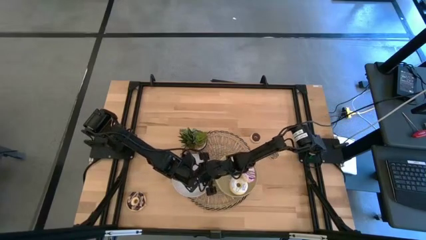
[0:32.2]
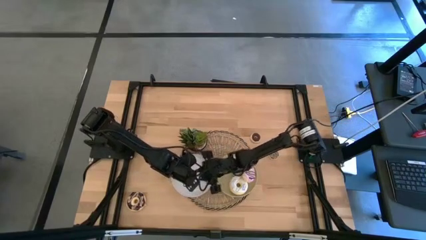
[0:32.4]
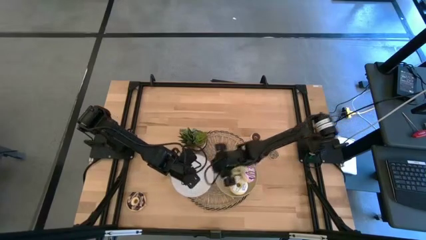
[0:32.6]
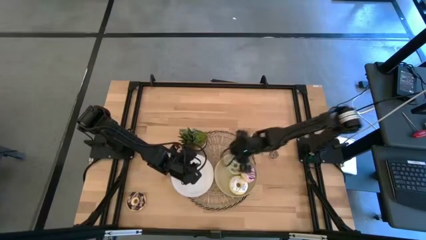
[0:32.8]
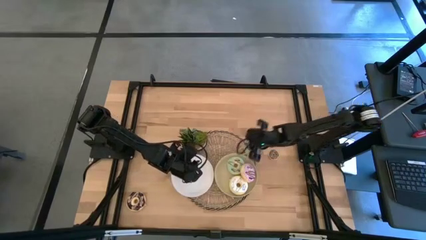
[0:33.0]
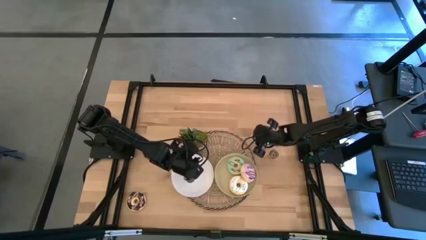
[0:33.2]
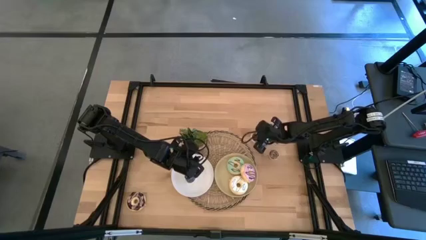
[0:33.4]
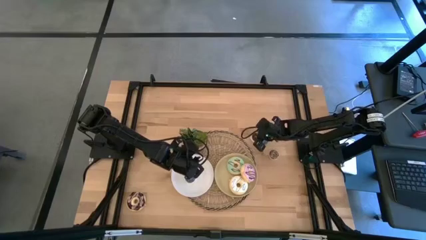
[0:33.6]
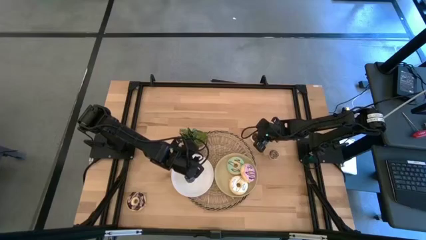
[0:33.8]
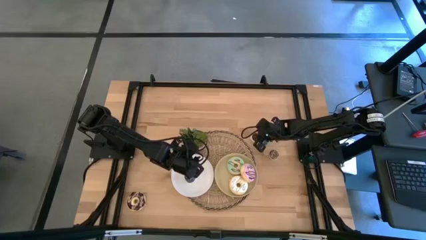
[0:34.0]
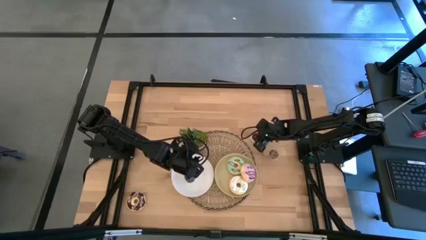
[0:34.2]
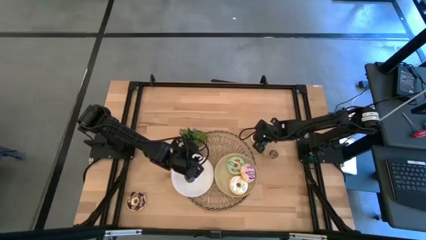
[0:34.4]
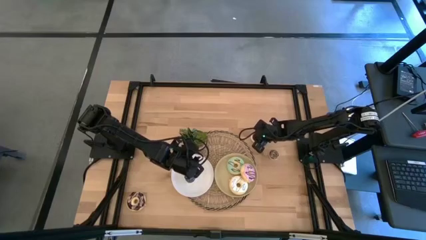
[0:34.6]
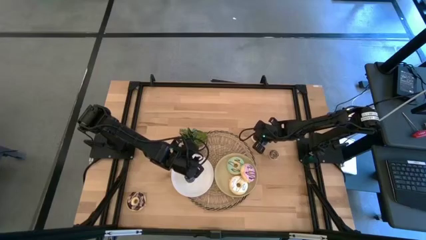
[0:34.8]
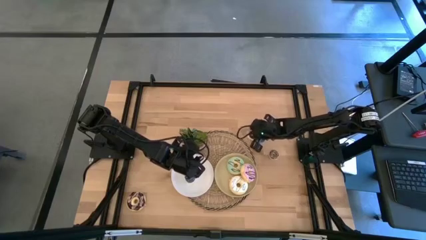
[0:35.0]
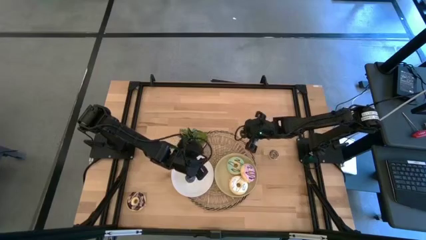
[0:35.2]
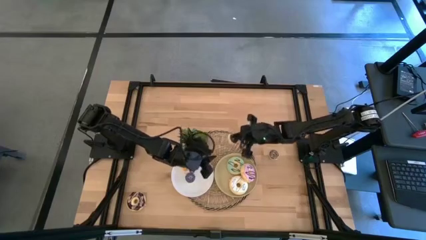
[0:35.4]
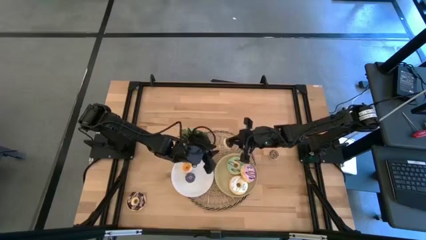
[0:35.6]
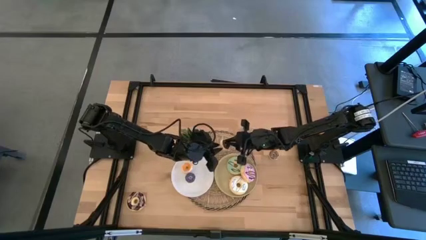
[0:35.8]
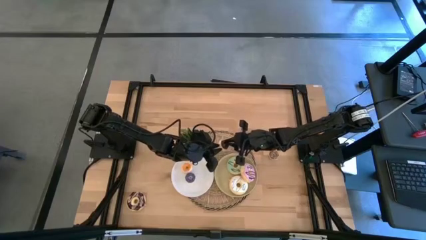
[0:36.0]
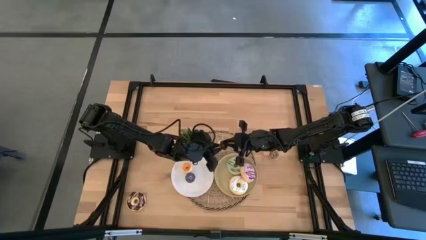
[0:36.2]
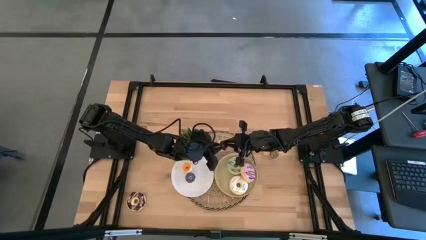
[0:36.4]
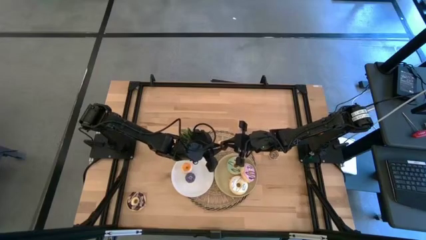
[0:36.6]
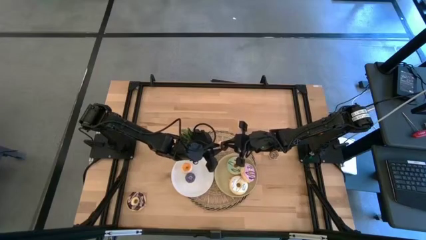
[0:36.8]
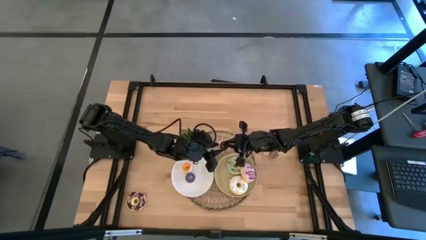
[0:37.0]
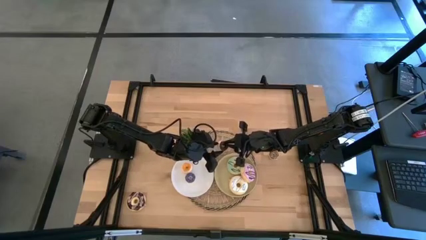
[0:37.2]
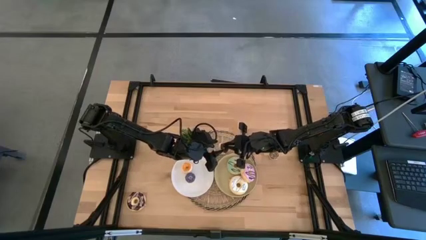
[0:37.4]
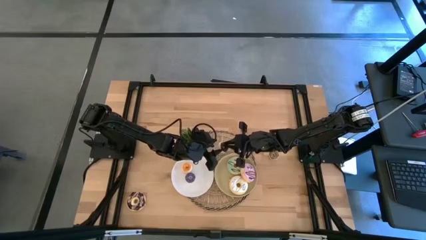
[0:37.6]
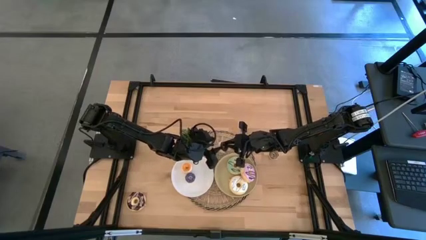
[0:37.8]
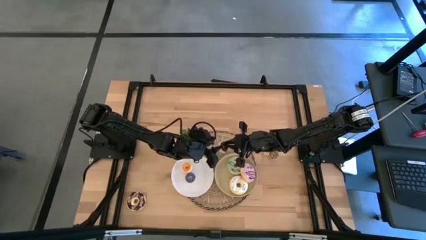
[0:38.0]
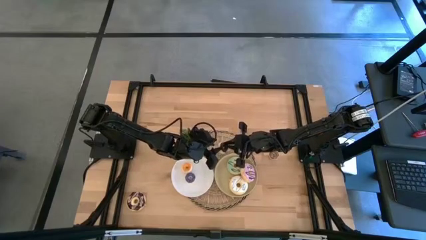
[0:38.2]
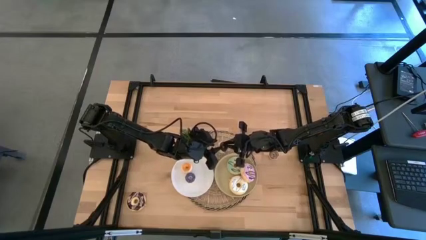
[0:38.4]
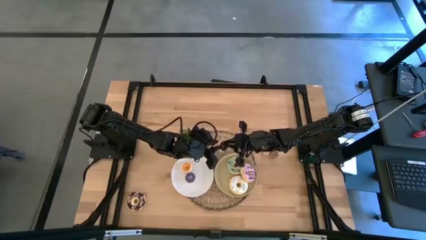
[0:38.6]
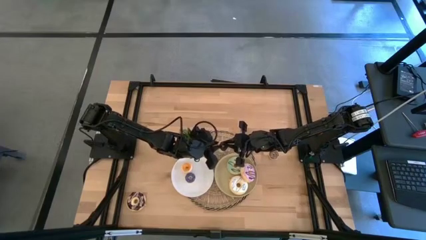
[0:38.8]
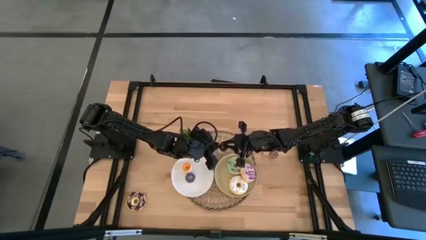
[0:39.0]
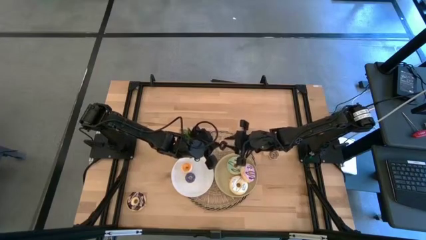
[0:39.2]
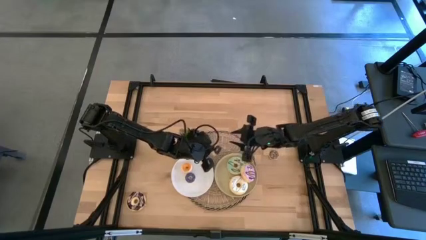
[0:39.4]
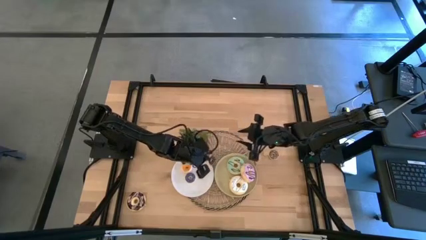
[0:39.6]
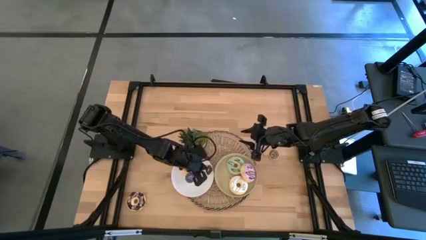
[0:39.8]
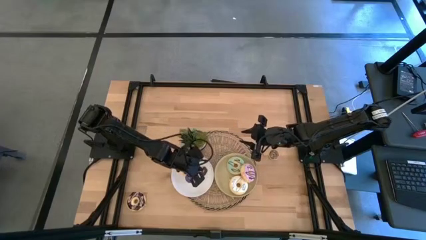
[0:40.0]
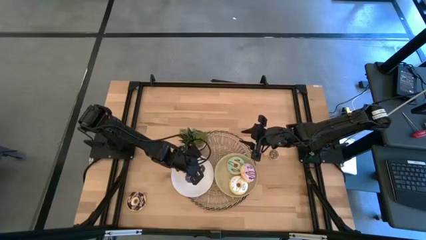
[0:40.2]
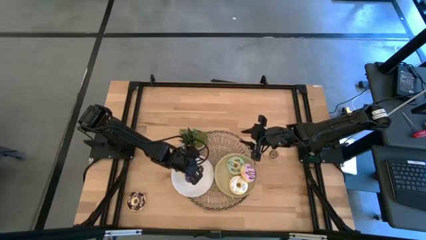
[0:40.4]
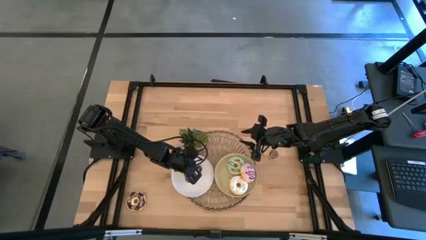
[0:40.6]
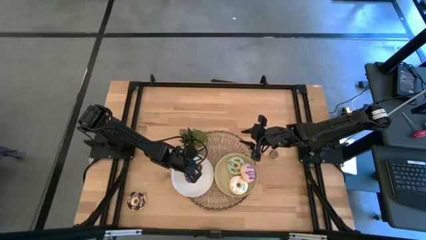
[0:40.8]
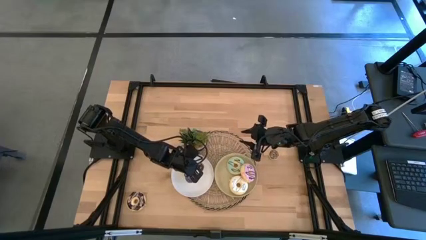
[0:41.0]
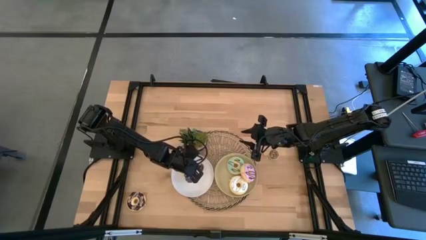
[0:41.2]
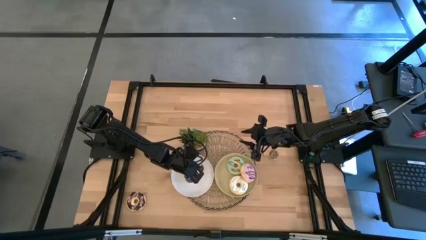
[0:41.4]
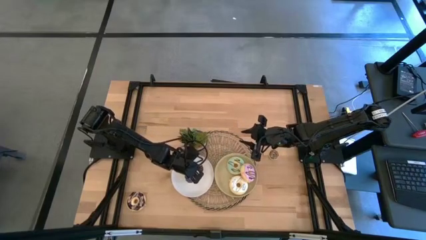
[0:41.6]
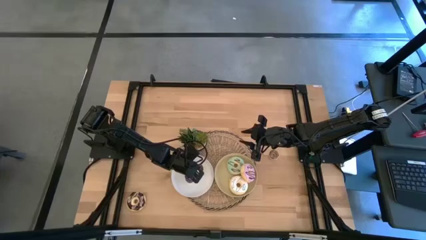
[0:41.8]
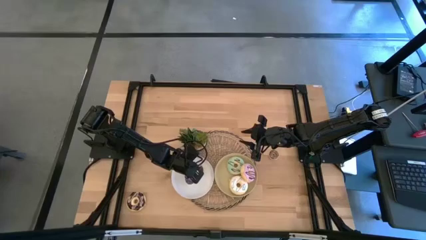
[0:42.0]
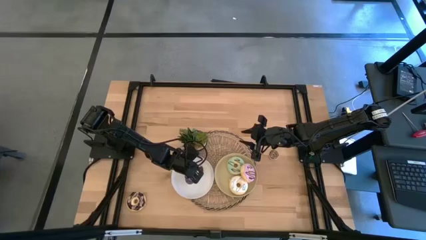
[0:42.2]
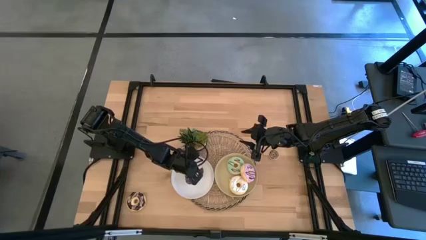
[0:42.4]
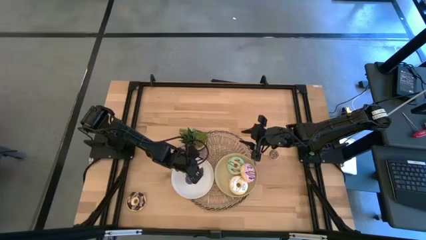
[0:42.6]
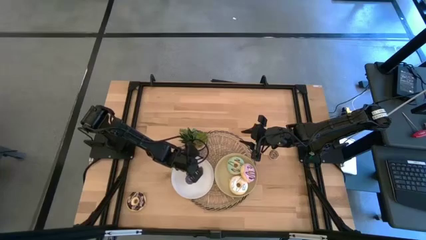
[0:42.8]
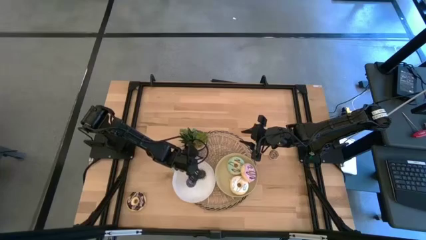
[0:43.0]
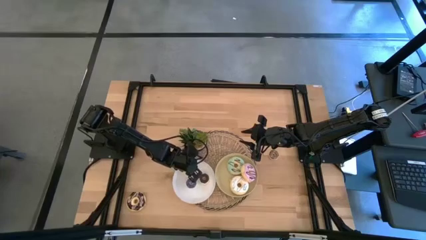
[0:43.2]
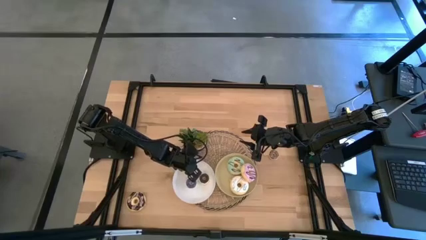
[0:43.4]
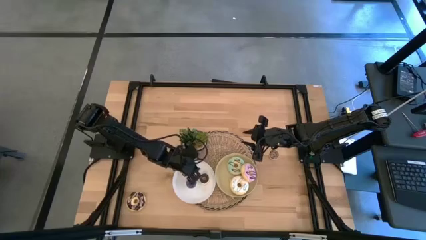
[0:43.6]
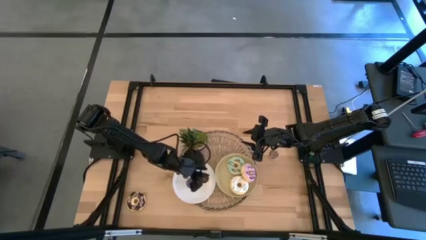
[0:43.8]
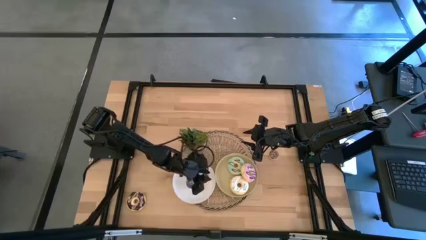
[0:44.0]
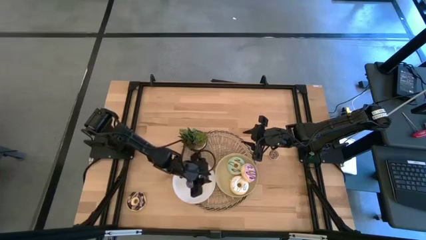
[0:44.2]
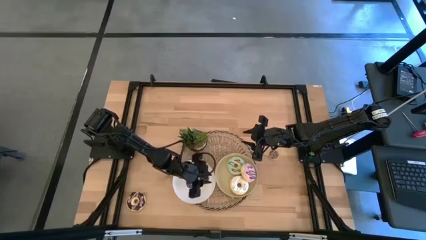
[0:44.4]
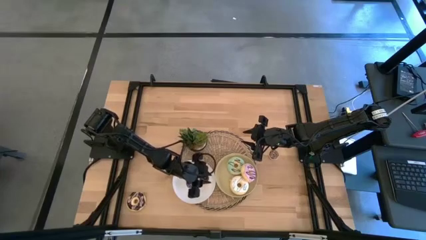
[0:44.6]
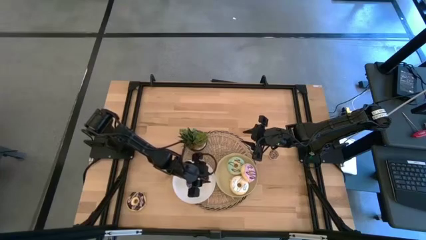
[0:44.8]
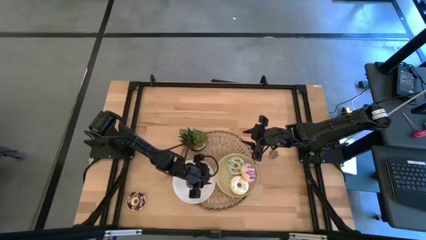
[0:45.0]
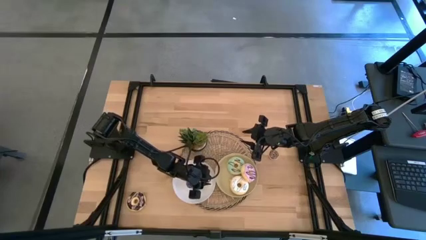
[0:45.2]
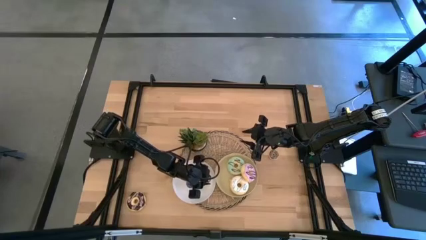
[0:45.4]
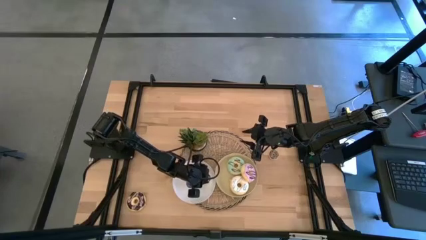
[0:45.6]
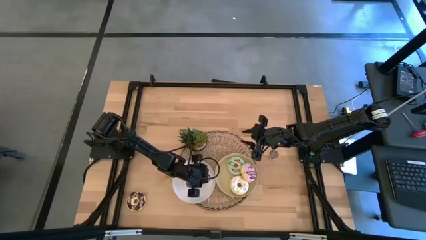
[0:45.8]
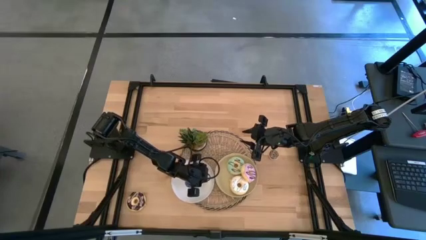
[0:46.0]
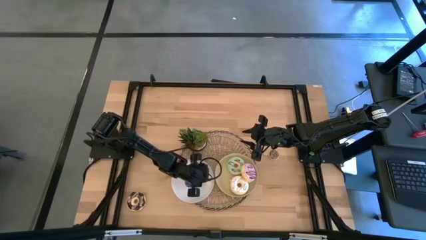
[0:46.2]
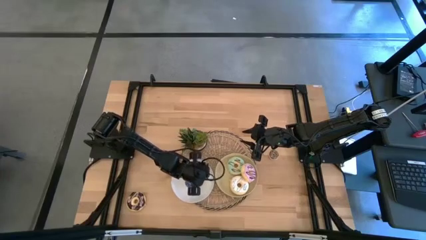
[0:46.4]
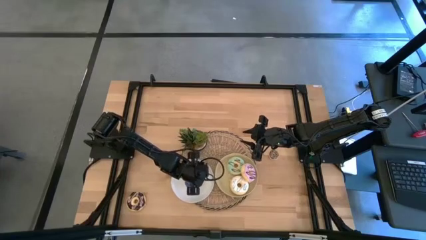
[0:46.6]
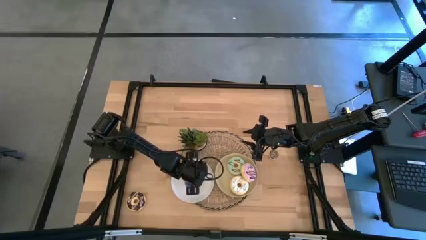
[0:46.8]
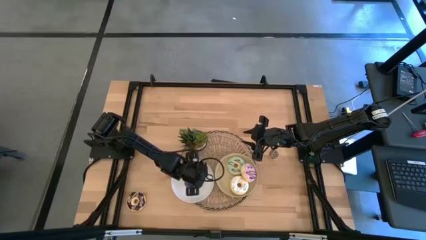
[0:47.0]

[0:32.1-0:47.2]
Task: Pick & Place donuts
Put the small black donut on the white plate
